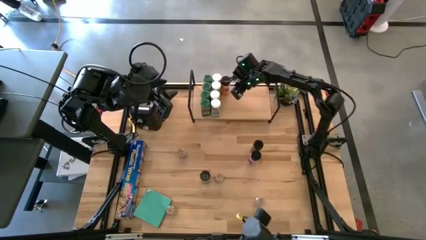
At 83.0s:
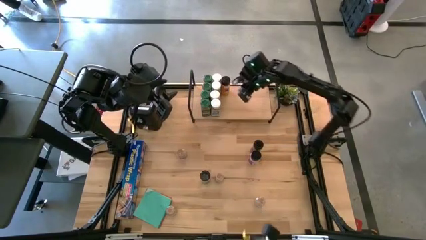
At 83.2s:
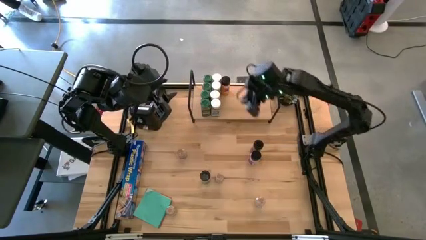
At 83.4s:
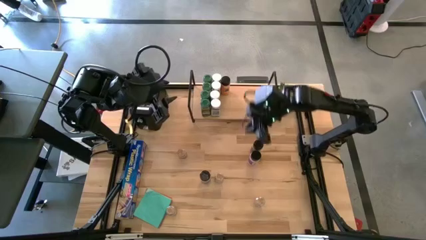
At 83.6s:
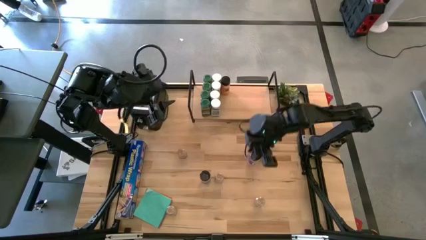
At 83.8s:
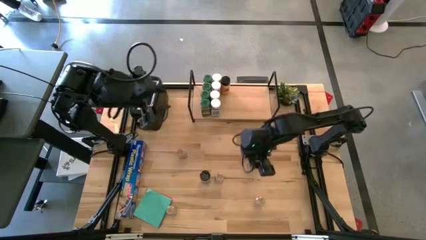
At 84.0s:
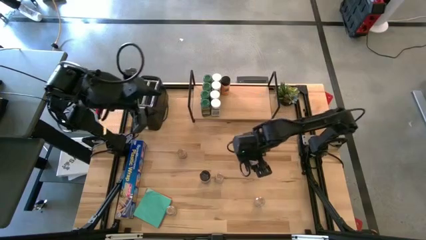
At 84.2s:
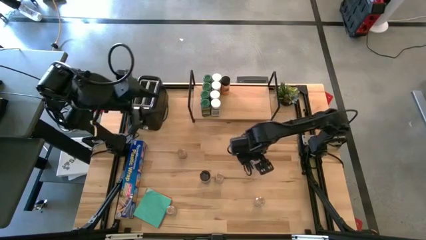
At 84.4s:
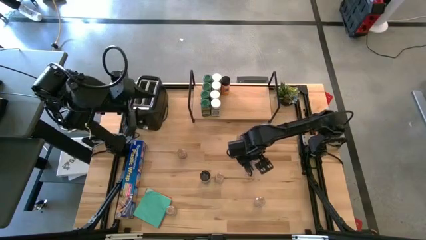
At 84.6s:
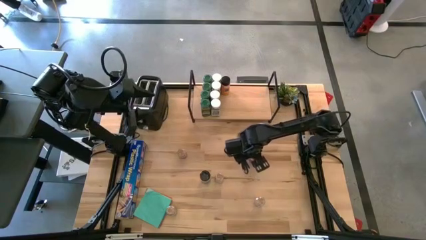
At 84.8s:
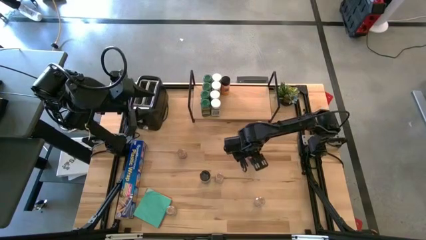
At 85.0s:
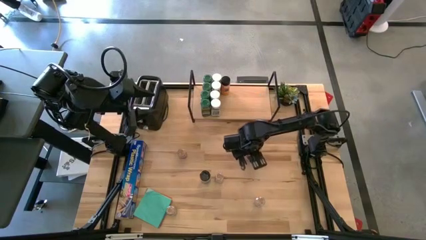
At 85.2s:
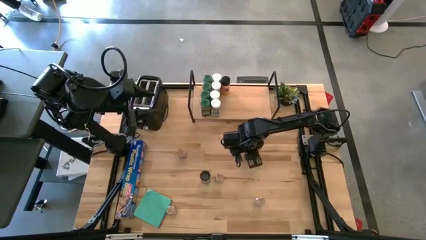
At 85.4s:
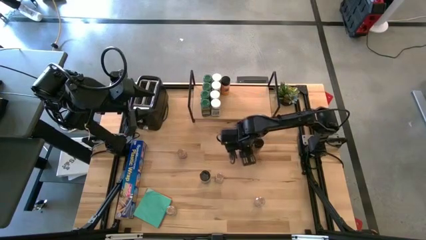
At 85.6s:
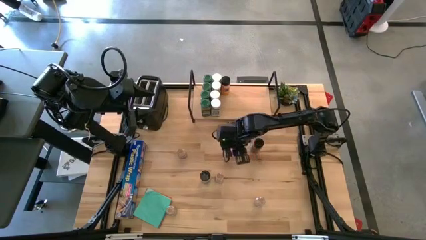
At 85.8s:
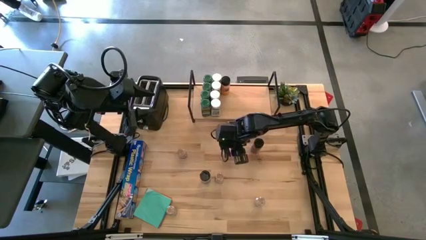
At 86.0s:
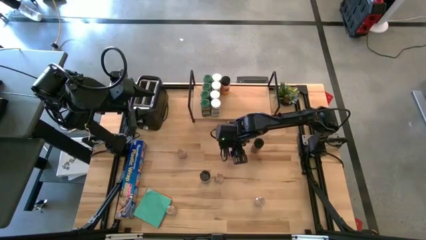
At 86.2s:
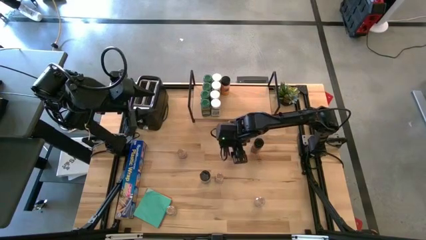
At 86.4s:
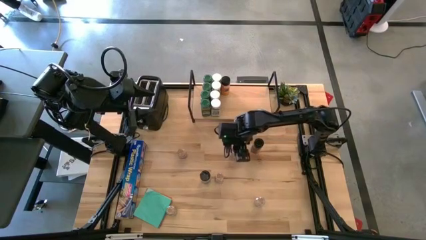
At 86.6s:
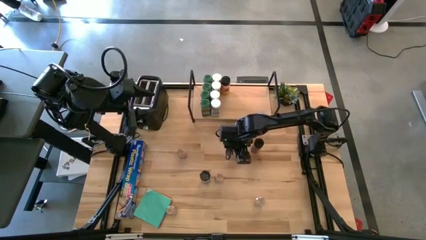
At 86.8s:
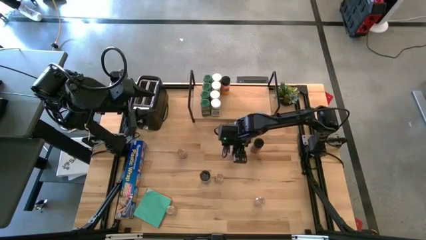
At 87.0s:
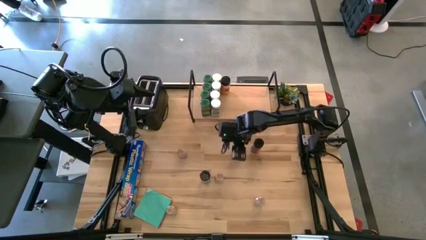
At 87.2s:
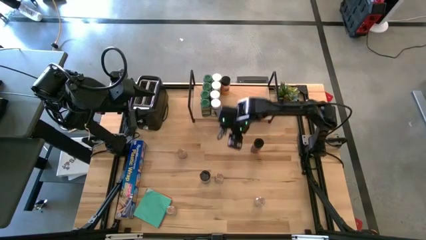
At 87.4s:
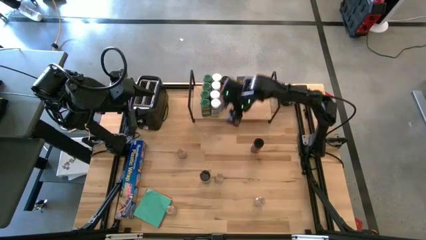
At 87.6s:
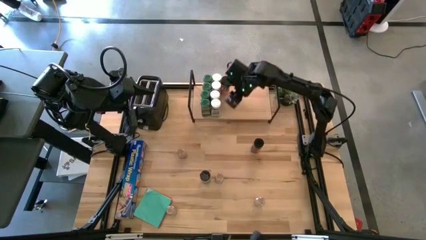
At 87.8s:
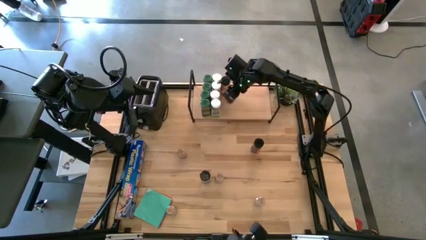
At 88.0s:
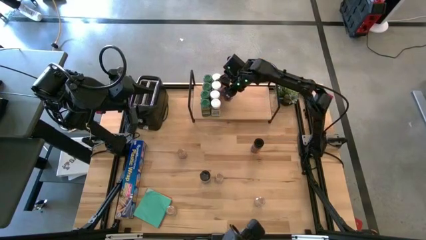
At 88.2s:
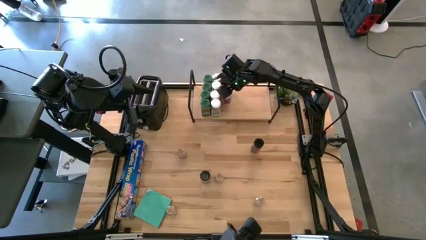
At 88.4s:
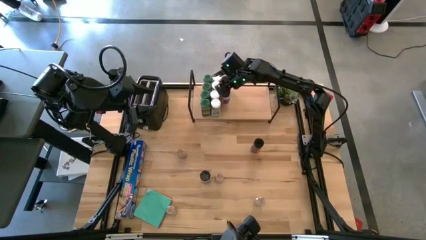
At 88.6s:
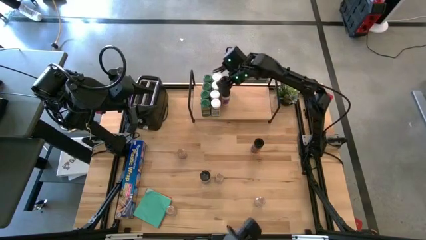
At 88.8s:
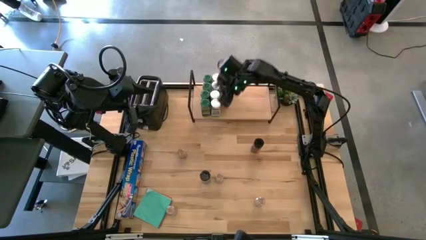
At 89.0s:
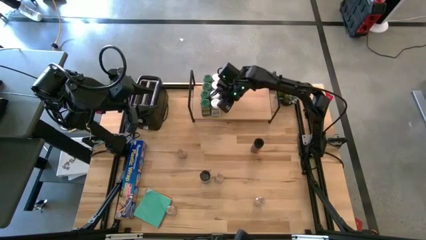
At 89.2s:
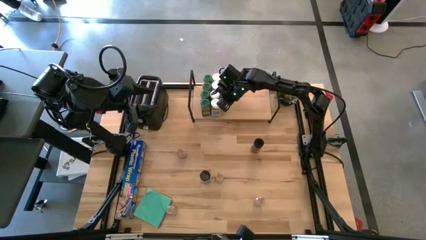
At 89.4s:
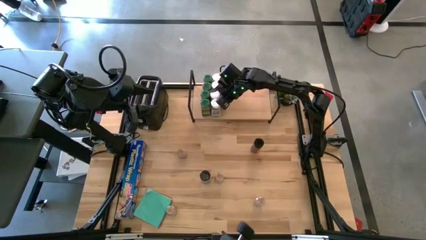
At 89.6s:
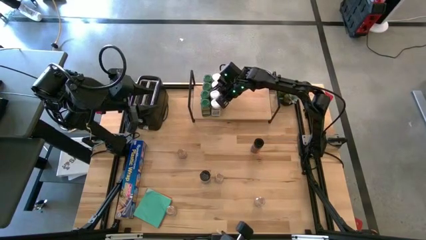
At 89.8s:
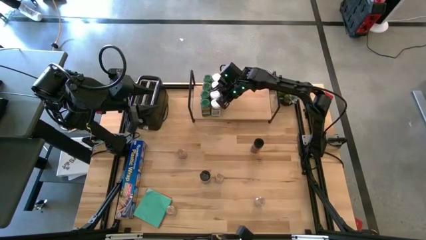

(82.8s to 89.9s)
Task: Shelf spices
Put the middle black seasoning bottle on the shelf aligned with the other black seasoning bottle

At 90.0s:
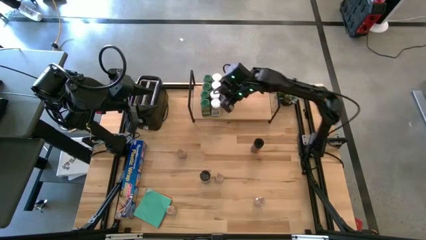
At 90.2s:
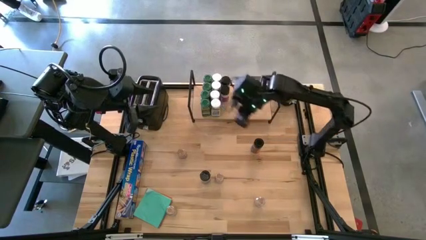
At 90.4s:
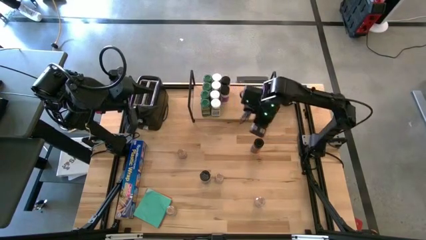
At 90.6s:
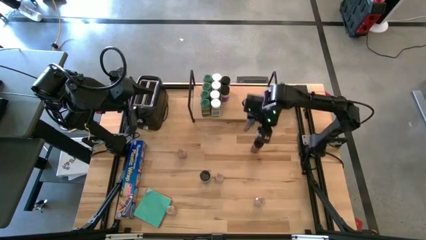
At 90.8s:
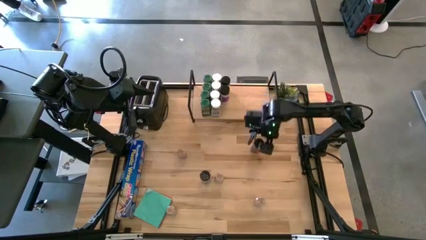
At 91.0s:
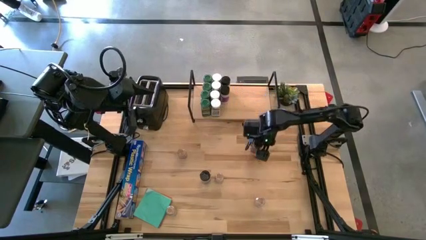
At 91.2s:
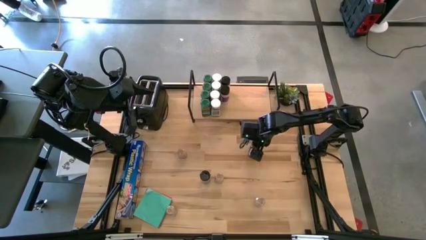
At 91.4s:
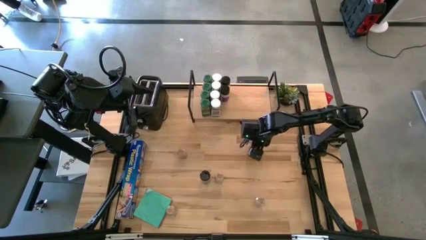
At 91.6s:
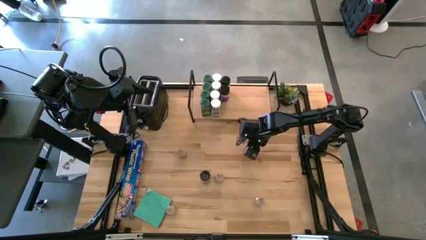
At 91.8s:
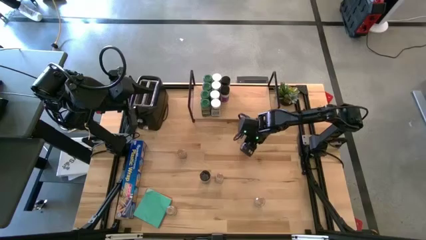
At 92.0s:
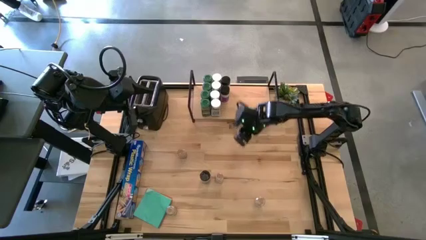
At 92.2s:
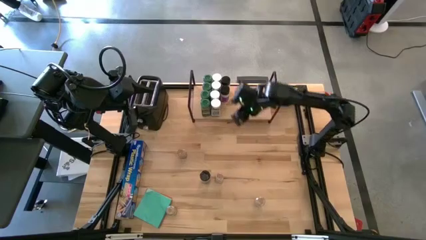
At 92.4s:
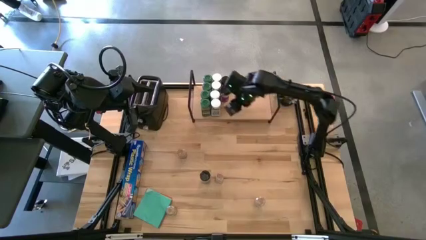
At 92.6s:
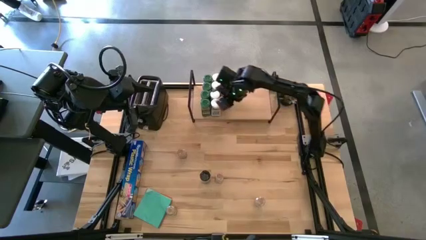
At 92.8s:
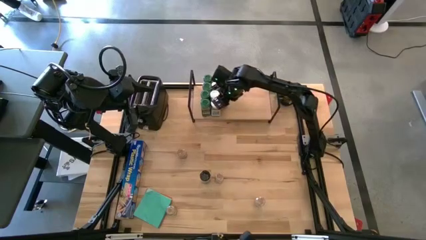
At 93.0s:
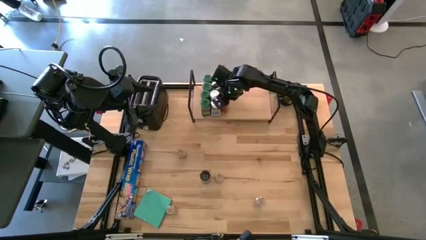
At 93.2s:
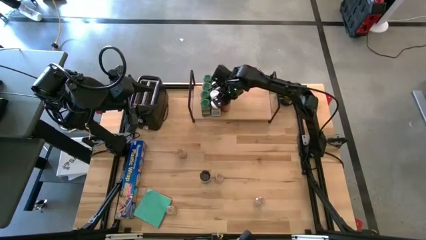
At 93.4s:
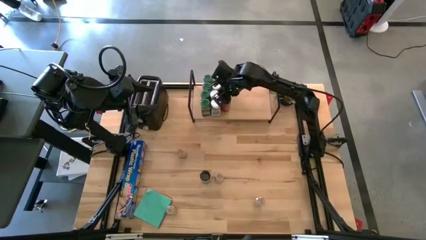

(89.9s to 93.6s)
Put the right black seasoning bottle on the shelf aligned with the other black seasoning bottles

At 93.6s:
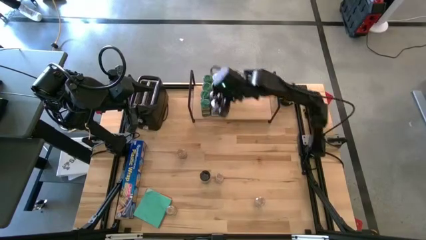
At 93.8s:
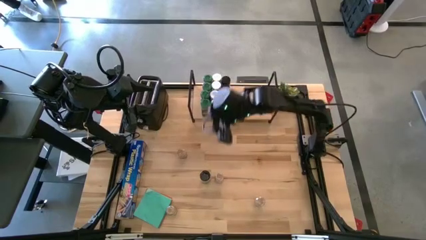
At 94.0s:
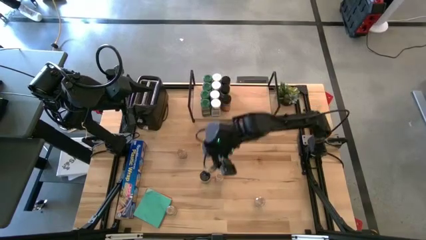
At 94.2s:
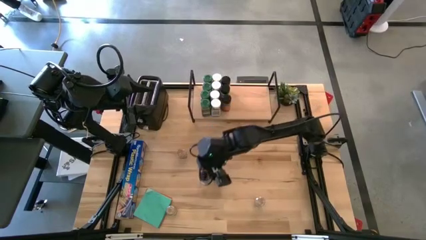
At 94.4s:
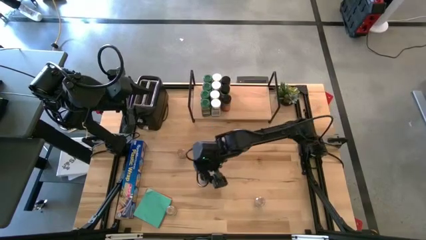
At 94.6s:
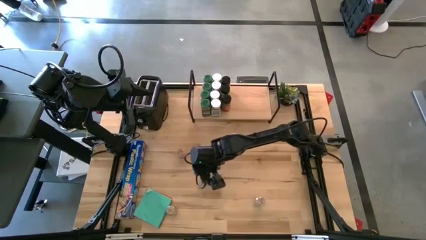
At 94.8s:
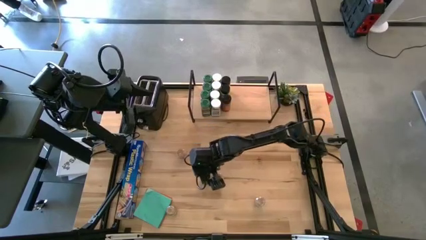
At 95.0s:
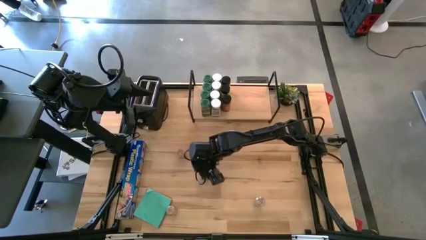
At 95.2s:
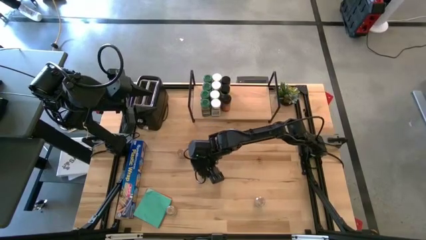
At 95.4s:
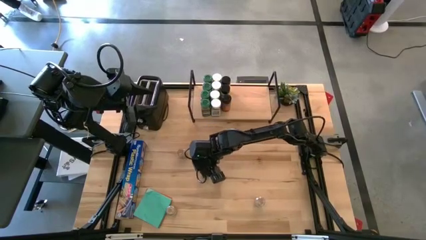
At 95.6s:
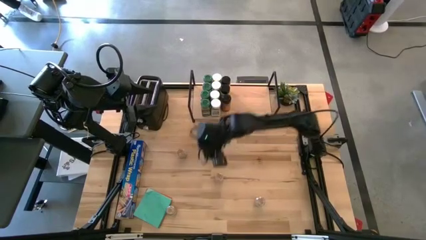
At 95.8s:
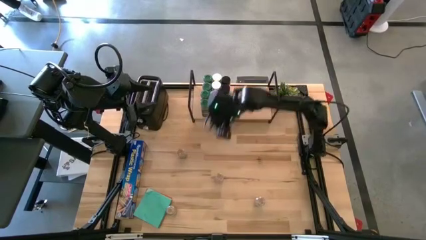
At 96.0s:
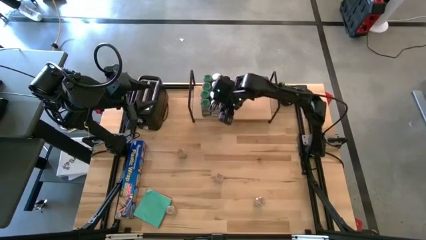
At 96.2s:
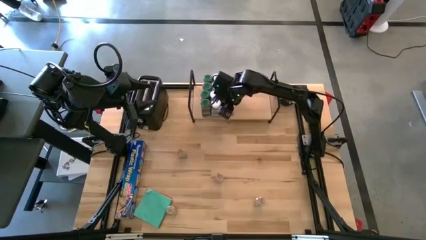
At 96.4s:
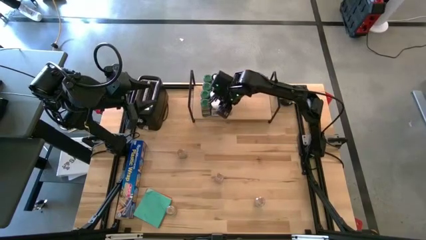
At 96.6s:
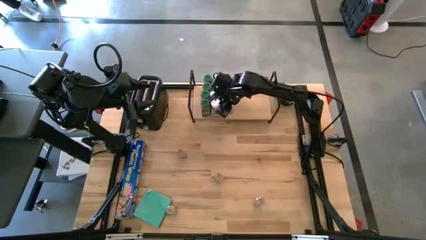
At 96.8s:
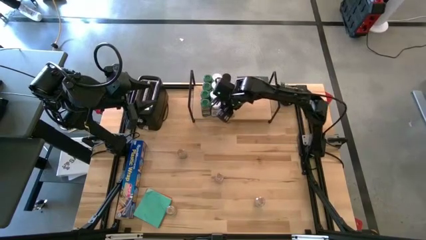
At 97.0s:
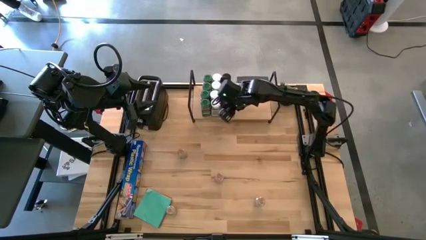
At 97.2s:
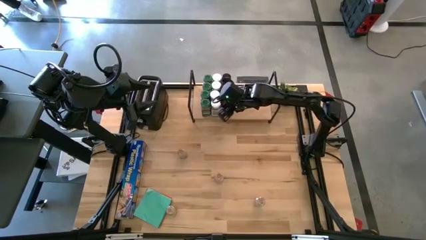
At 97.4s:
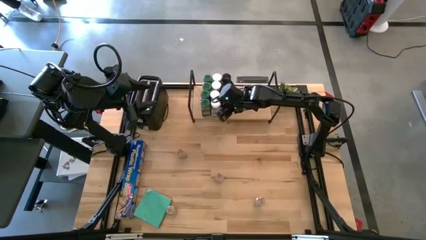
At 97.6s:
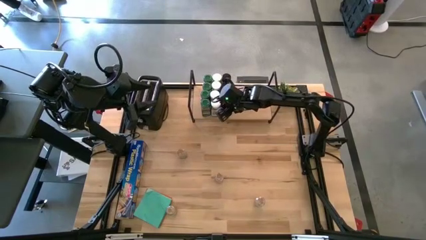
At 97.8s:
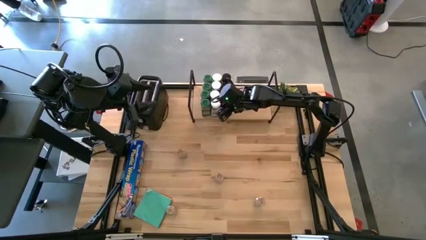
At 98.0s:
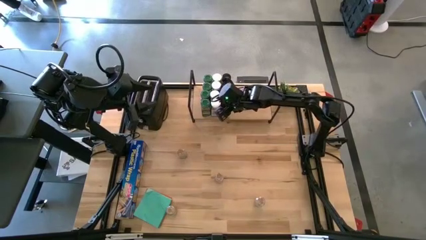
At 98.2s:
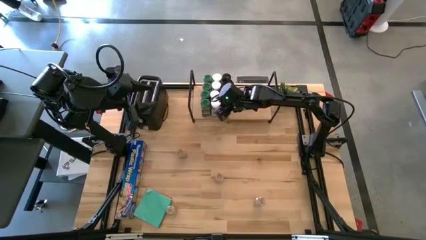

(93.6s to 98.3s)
Put the black seasoning bottle on the shelf aligned with the other black seasoning bottles

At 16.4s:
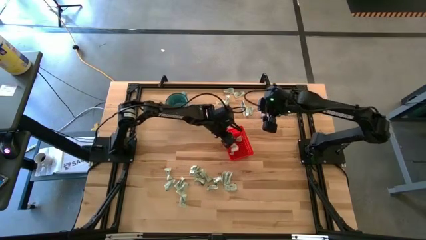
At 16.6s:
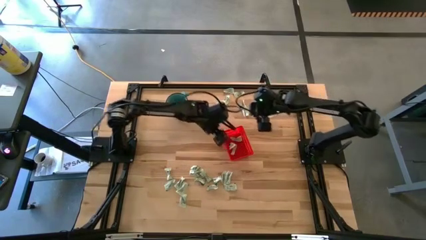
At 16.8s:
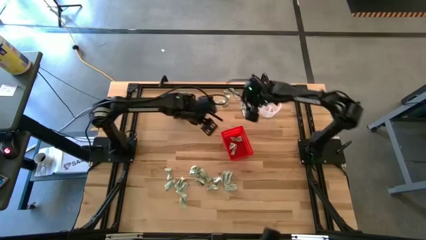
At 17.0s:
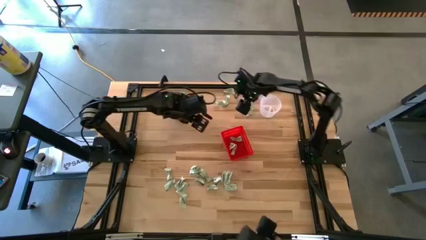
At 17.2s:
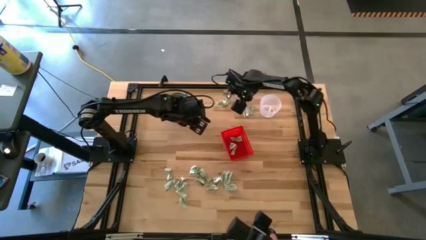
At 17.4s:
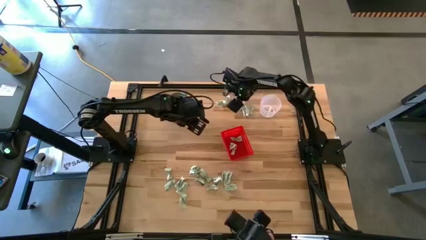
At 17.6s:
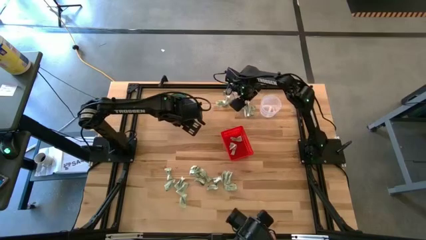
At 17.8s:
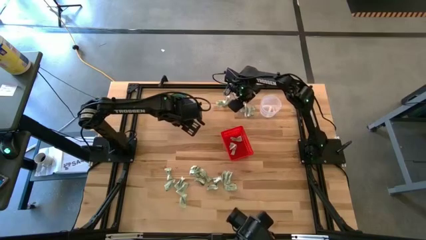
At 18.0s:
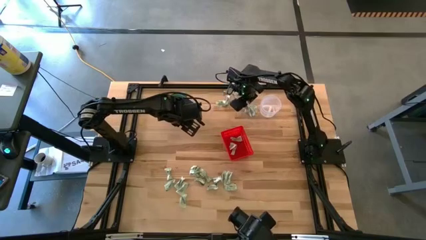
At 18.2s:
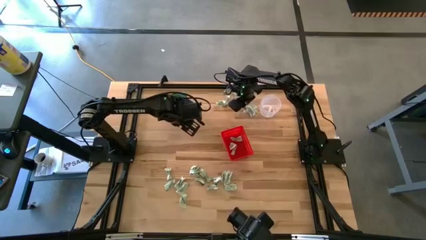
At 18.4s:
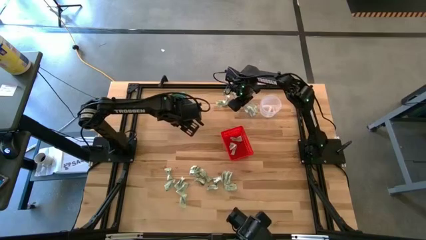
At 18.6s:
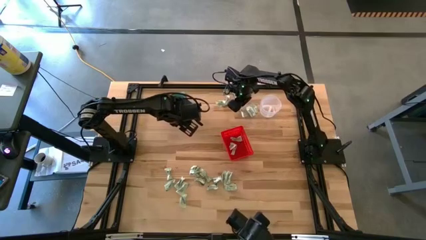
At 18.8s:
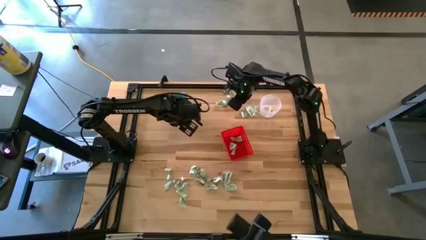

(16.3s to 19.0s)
Task: Pick and place items into bin
Put the stevia packet into the orange bin
